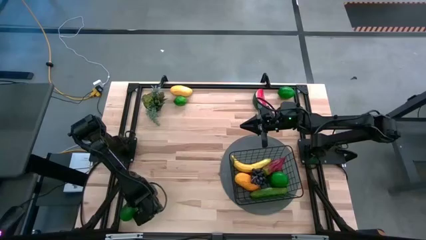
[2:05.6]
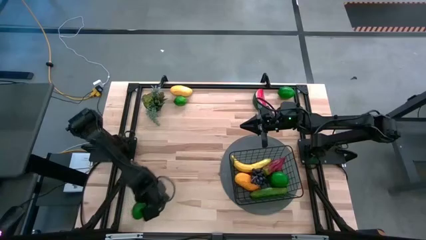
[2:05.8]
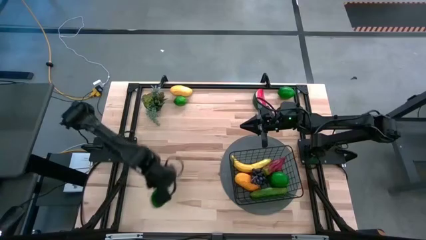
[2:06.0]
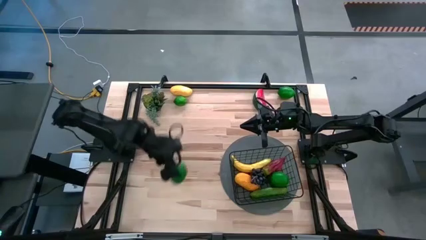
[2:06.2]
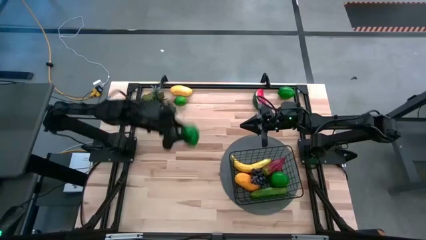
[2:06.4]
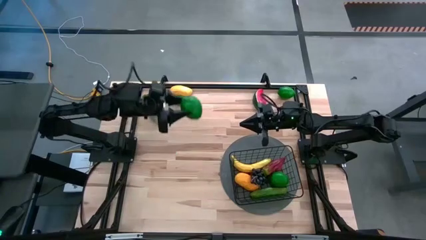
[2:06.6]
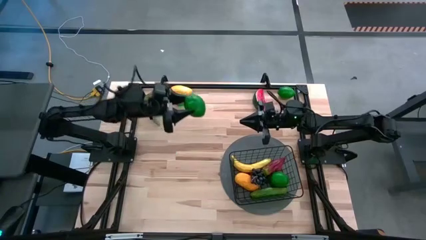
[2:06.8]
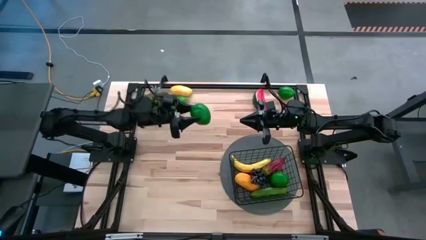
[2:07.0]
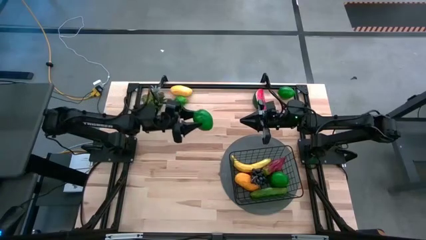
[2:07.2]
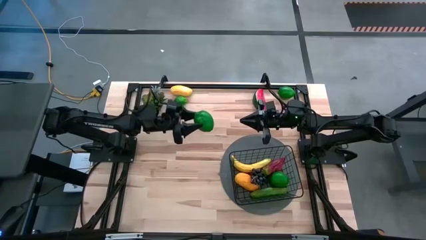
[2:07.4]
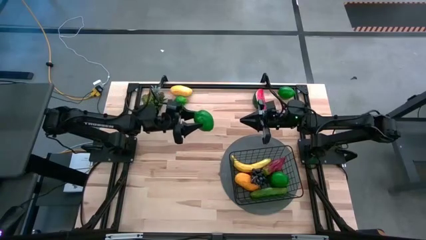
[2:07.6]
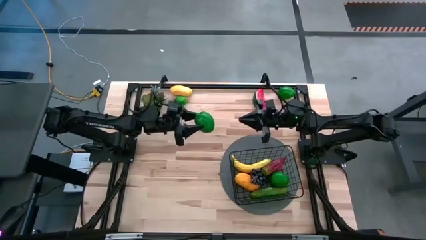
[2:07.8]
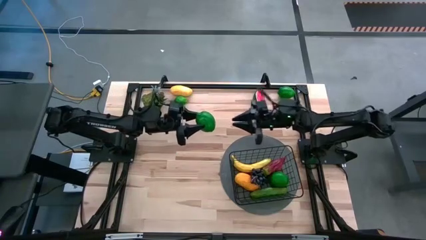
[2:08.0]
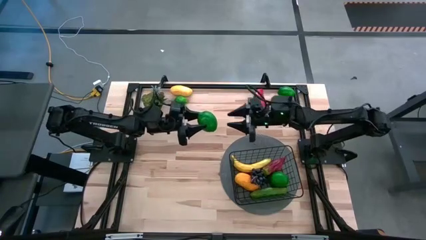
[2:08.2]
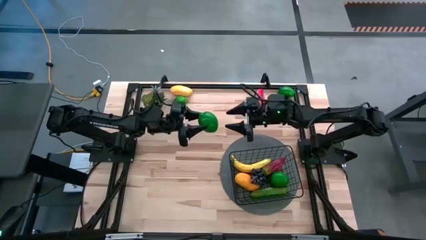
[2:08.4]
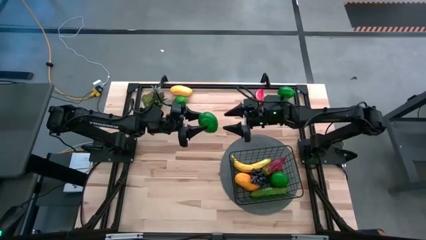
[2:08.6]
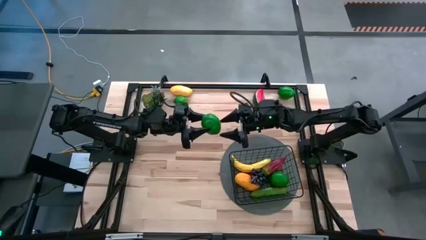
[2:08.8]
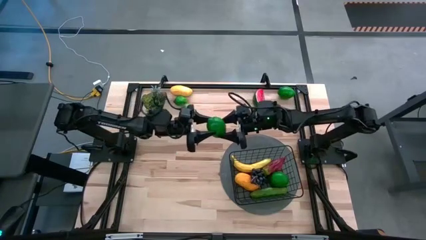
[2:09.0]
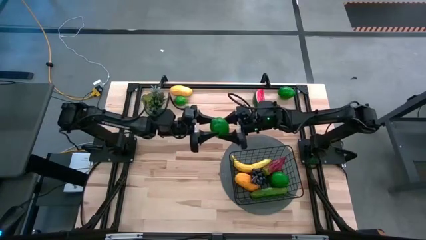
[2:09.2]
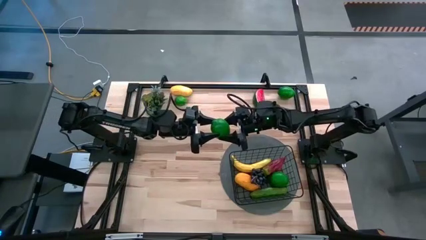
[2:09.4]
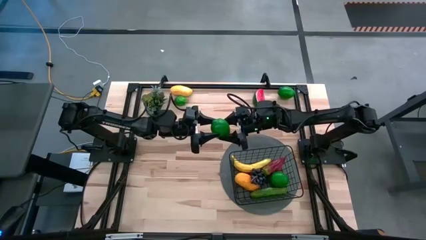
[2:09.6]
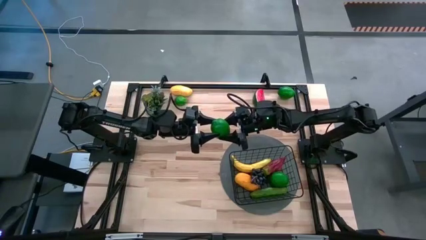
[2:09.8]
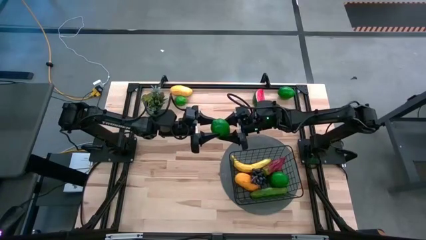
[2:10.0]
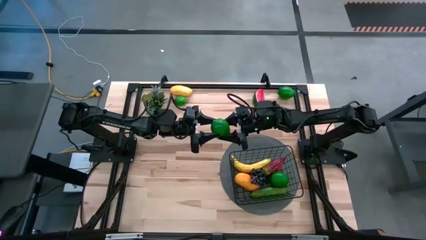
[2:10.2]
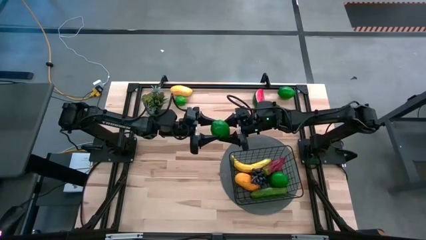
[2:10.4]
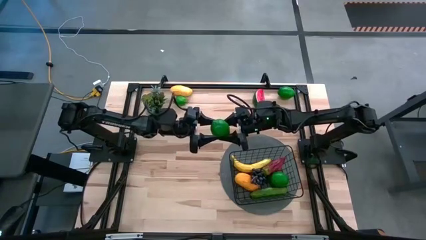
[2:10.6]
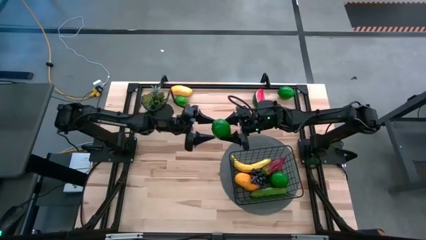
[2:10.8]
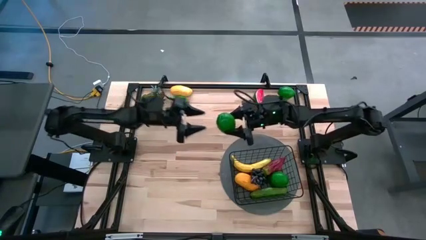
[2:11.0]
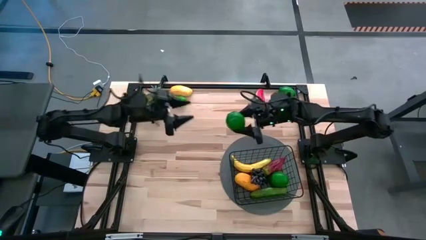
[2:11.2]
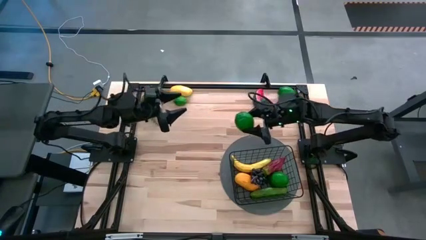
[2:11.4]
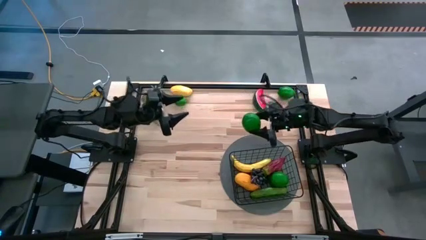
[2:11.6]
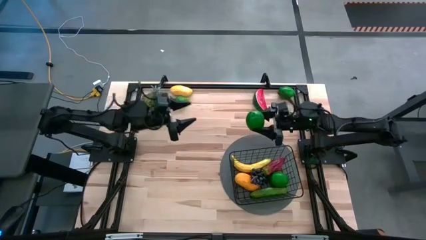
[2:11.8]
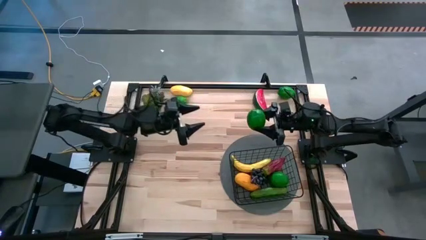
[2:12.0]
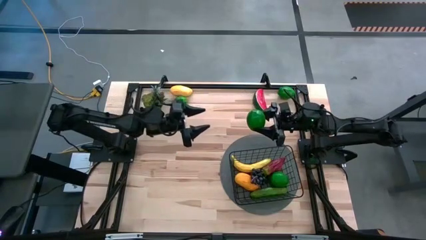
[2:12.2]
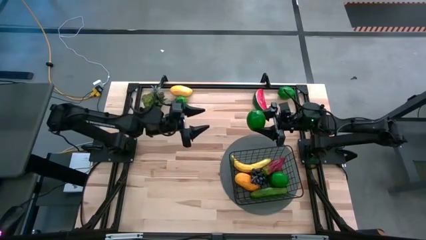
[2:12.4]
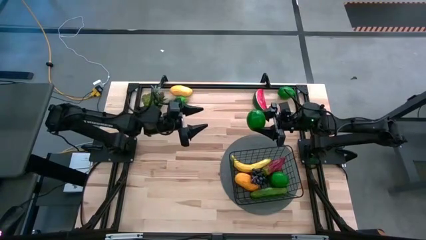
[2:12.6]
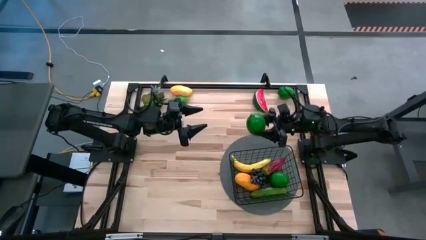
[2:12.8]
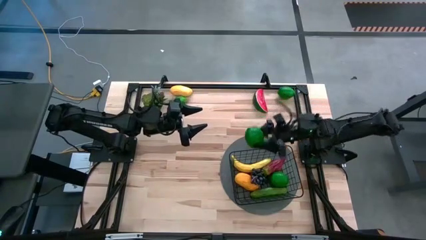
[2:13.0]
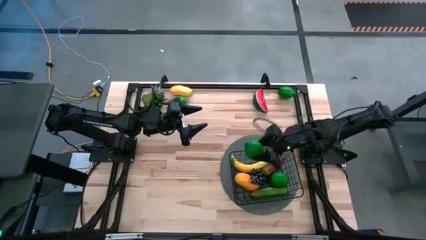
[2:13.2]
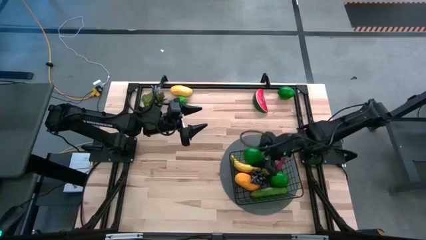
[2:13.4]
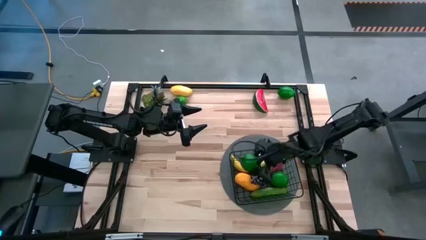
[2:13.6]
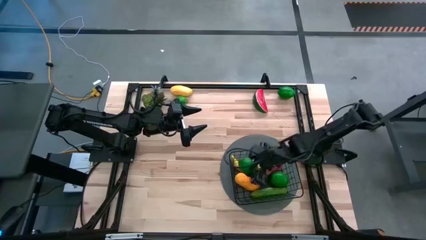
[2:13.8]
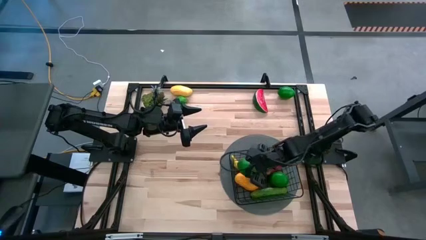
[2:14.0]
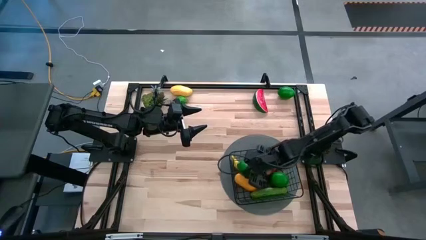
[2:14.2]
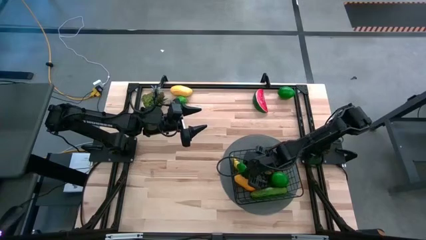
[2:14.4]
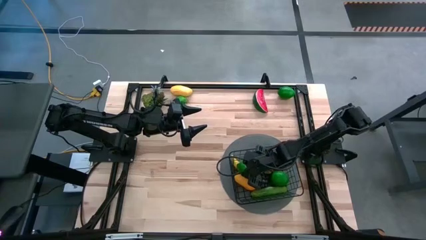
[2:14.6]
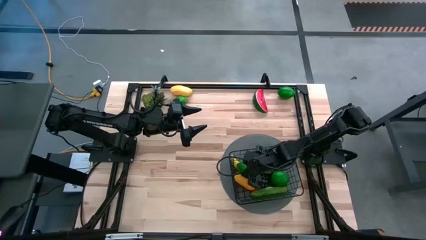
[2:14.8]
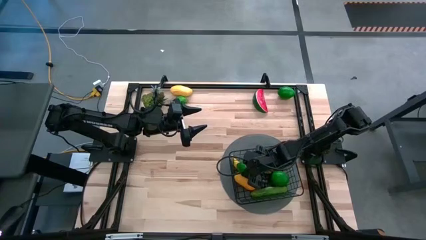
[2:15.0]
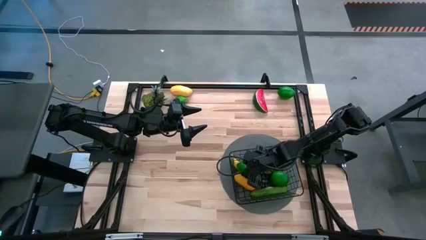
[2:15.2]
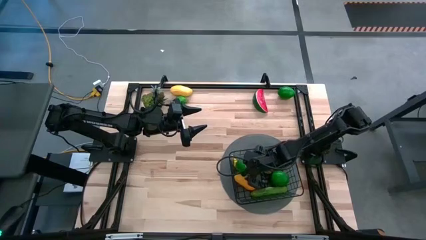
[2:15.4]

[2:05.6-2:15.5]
Task: Build produce basket
Put the green lime into the black basket

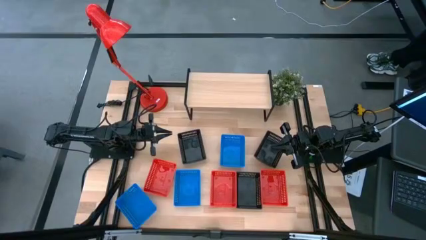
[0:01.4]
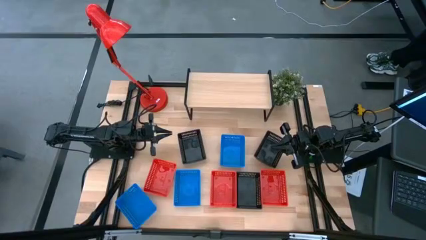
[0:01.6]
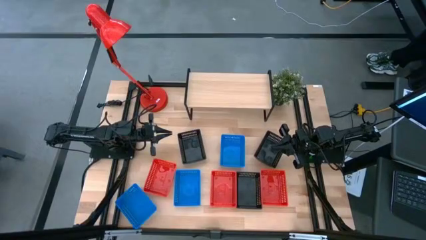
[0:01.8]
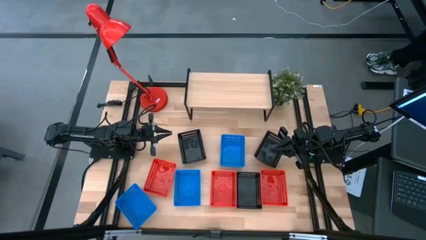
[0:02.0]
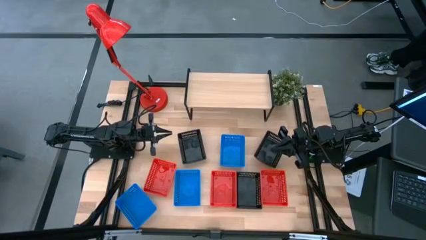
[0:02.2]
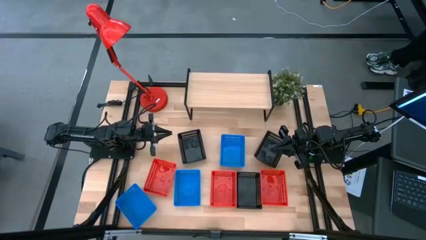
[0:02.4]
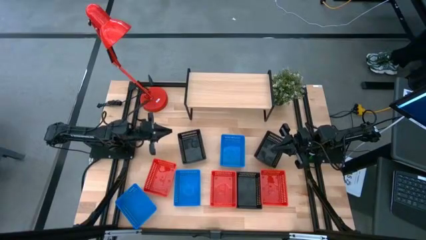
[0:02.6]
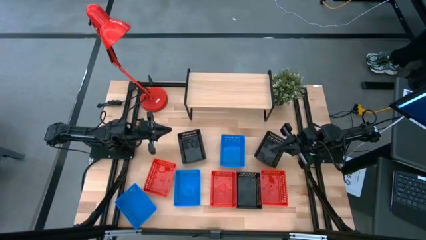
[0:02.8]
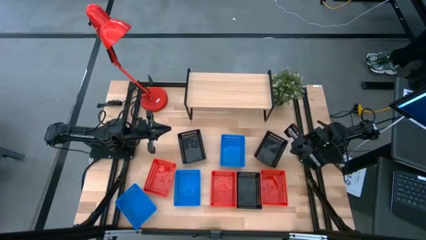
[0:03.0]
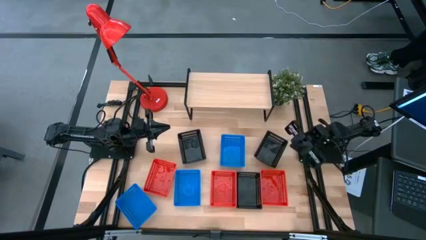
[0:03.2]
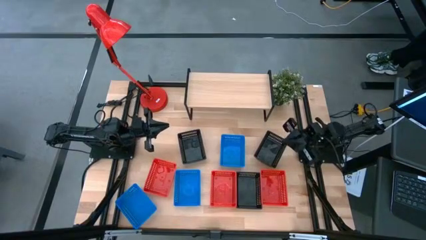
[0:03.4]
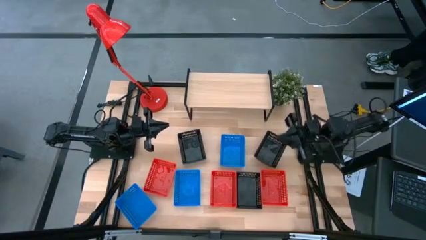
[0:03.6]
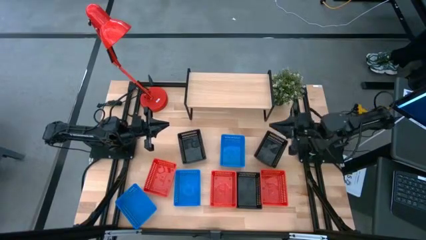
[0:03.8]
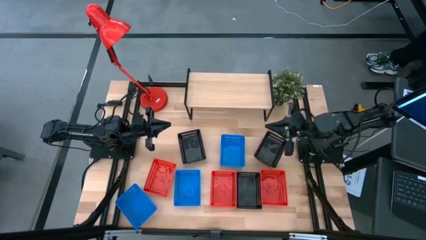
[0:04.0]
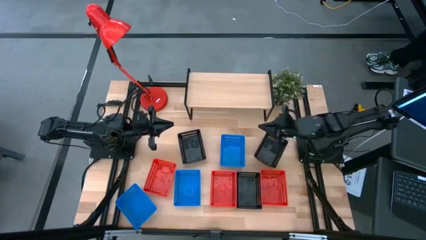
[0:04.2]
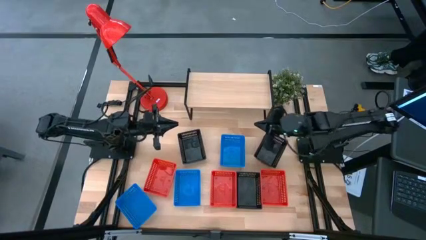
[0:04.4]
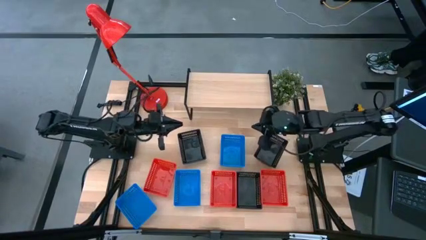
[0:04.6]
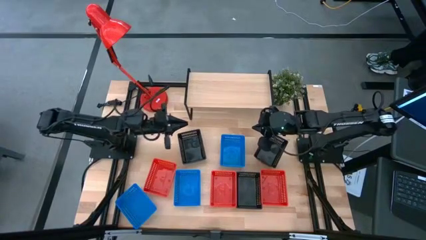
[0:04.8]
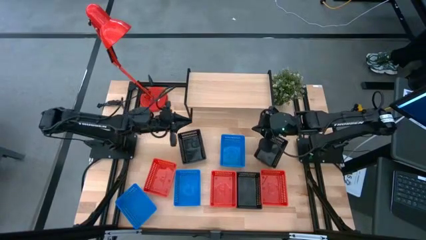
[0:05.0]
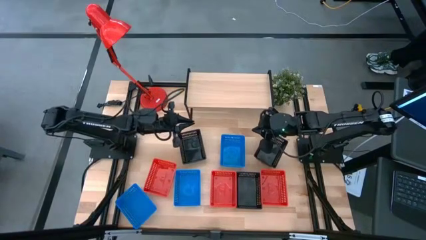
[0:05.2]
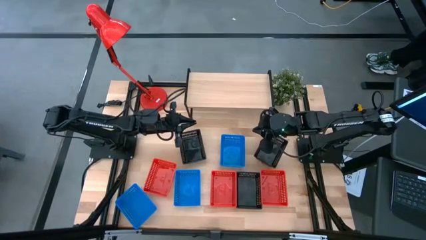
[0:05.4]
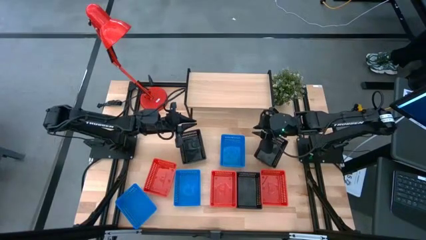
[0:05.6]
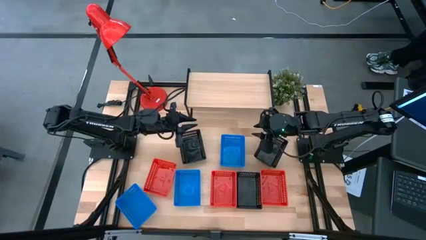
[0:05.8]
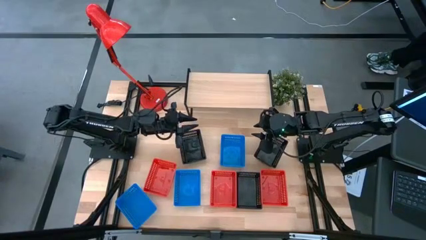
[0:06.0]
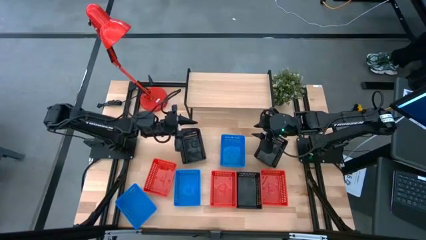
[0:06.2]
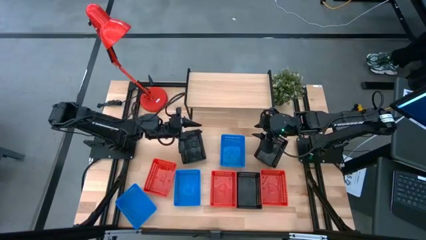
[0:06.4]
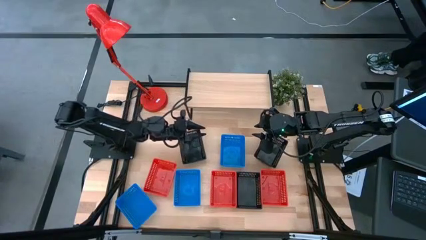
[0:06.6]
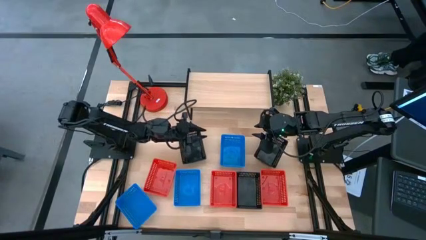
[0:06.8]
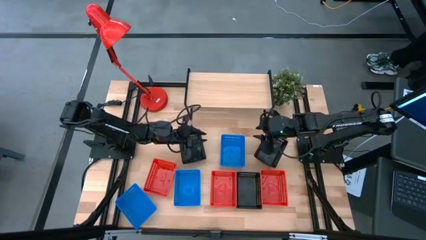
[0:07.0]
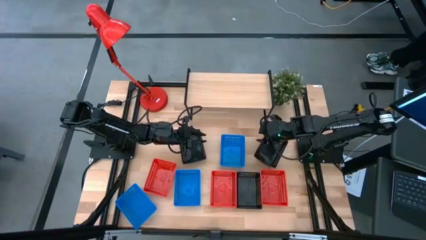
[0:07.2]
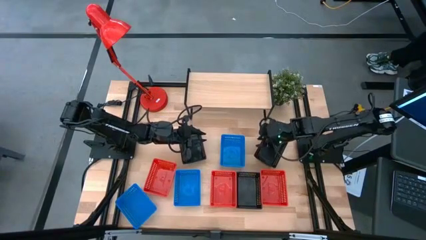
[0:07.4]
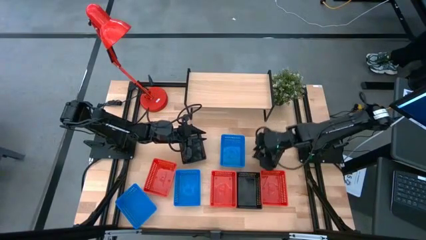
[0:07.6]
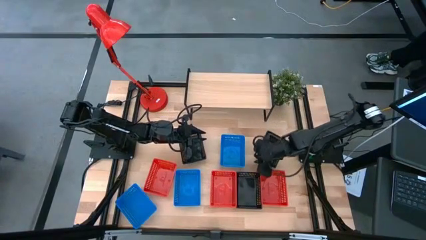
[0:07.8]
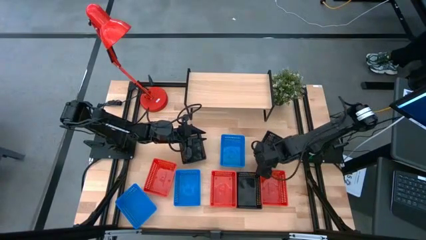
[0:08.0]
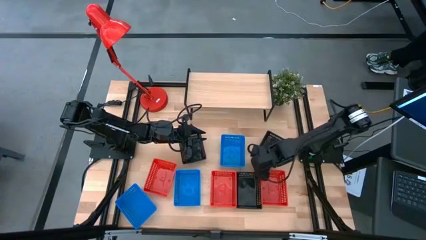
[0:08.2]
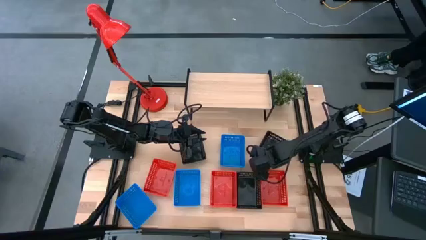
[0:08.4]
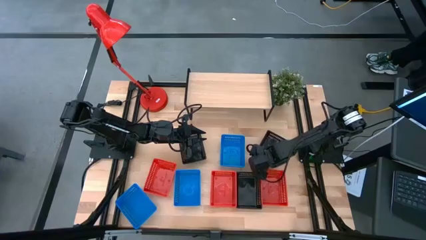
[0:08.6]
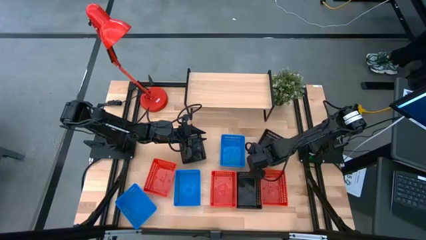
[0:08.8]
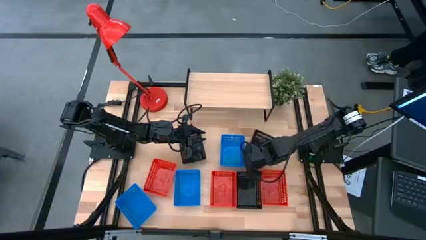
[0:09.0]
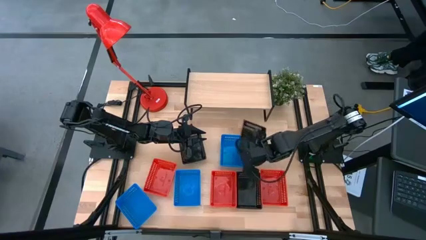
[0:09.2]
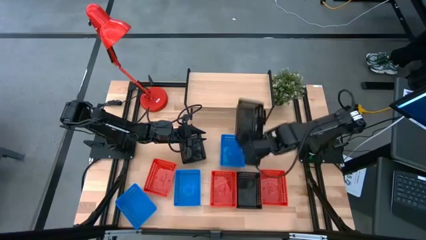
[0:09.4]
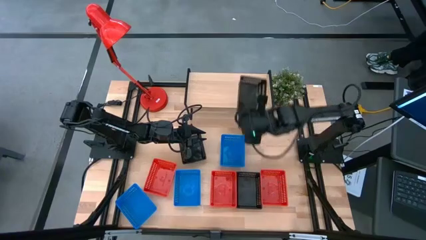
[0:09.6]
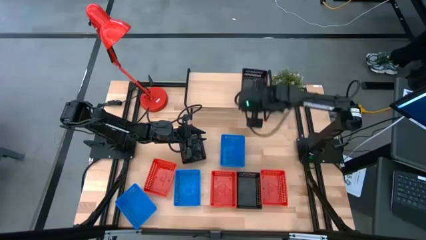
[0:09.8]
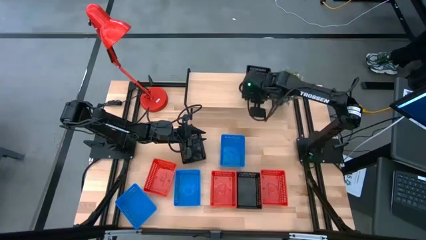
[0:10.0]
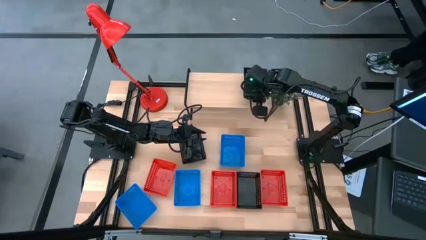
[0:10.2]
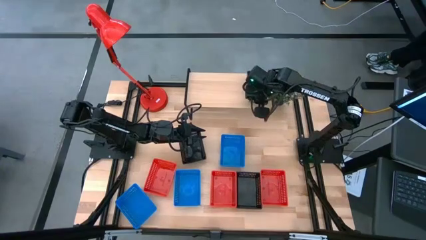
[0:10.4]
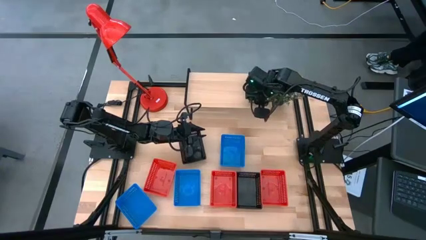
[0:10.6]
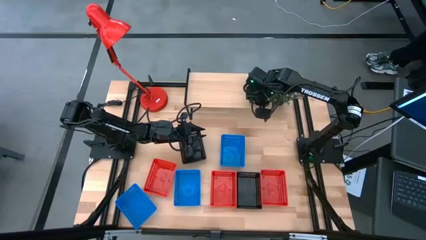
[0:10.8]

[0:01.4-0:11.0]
Task: Stack baskets on shelf by color
Put the top right black bin on the shelf
